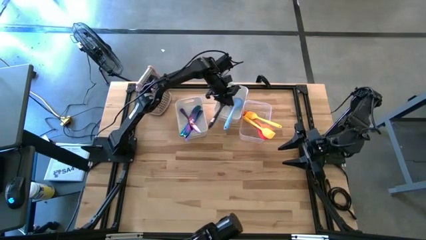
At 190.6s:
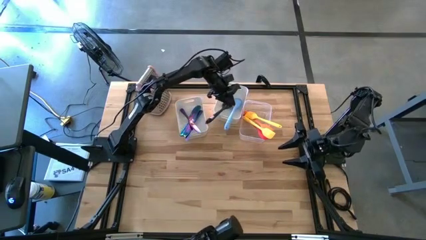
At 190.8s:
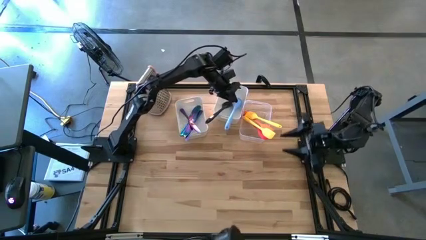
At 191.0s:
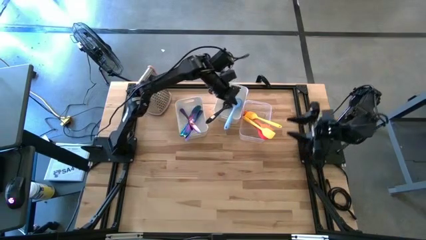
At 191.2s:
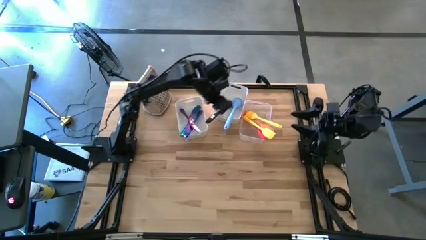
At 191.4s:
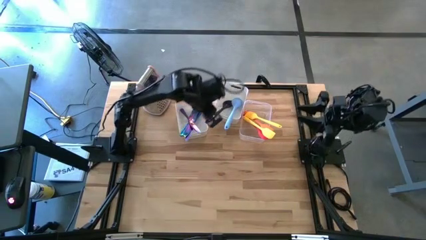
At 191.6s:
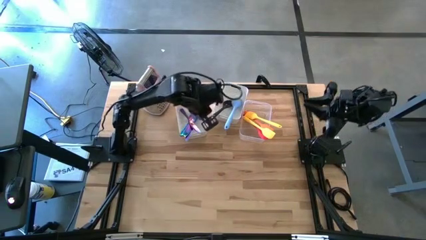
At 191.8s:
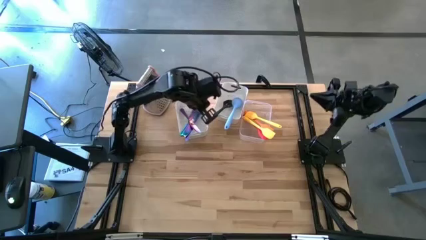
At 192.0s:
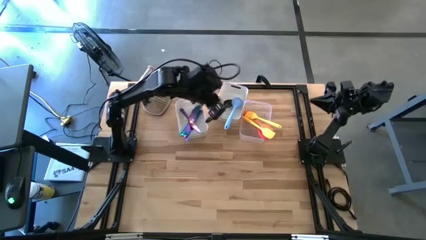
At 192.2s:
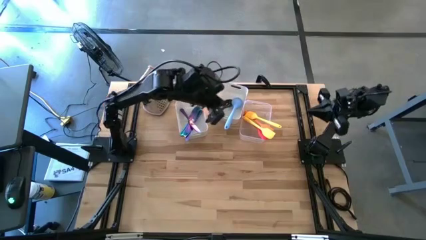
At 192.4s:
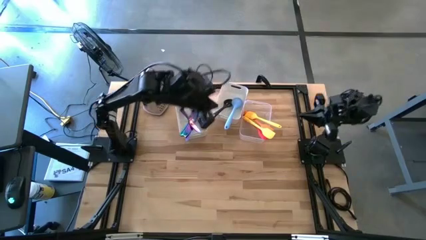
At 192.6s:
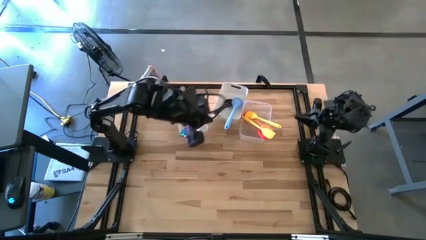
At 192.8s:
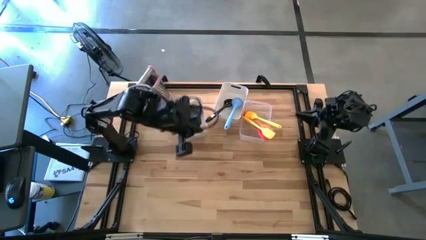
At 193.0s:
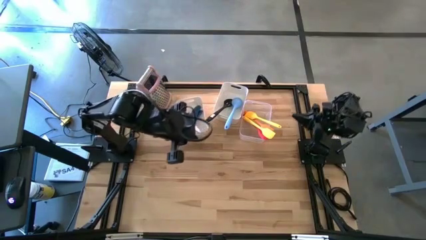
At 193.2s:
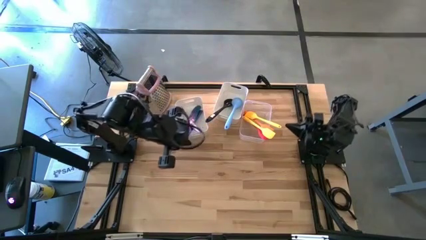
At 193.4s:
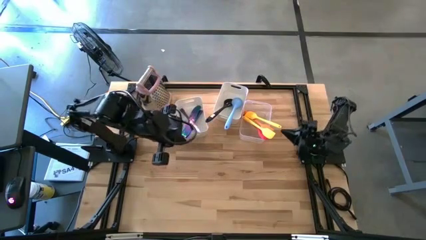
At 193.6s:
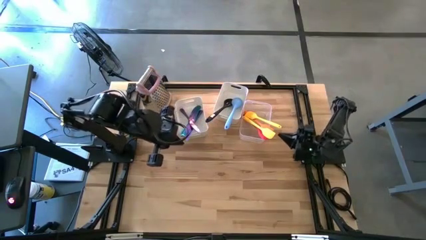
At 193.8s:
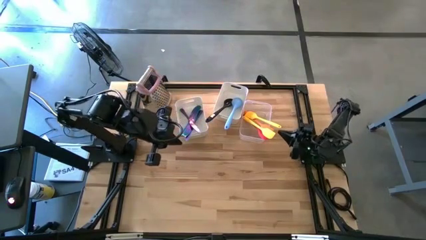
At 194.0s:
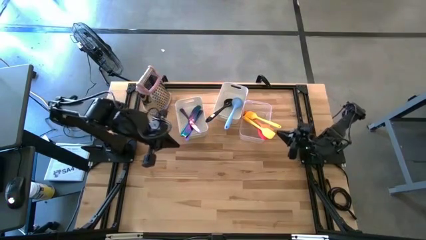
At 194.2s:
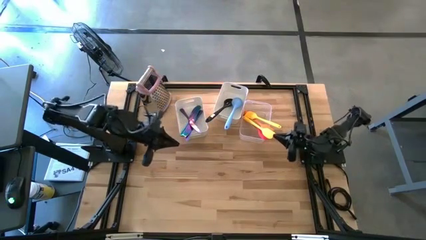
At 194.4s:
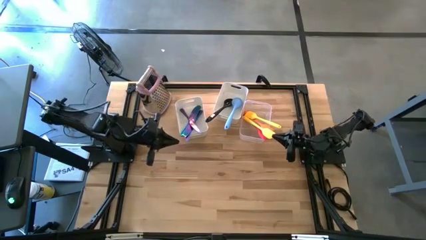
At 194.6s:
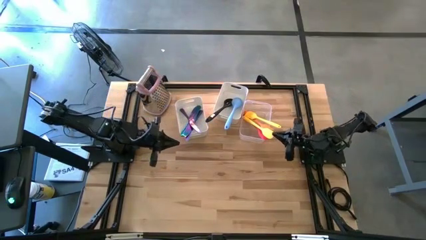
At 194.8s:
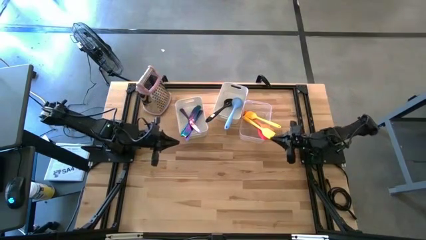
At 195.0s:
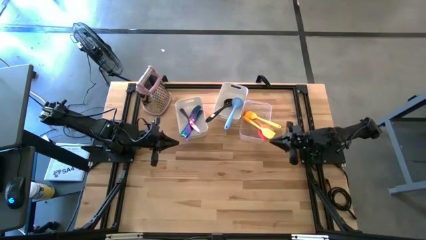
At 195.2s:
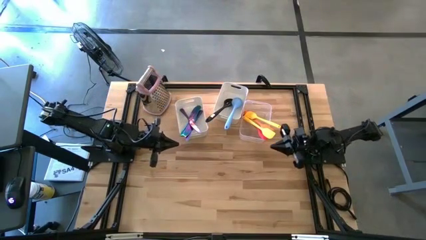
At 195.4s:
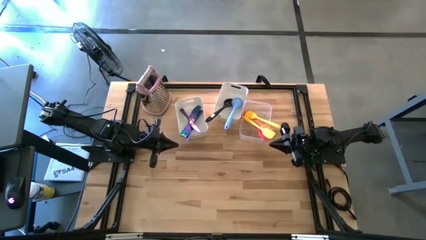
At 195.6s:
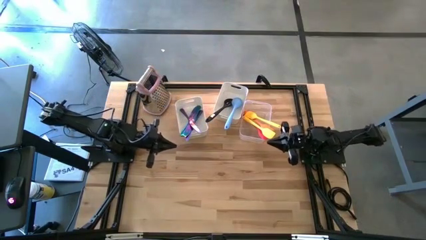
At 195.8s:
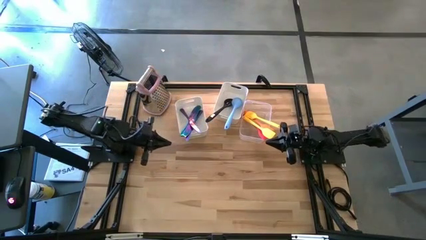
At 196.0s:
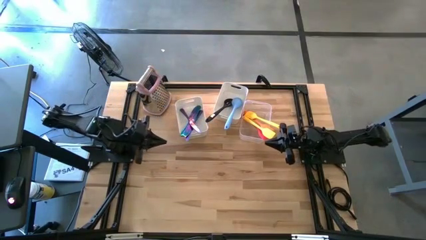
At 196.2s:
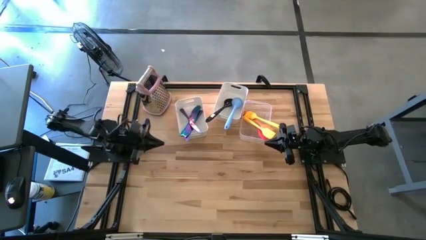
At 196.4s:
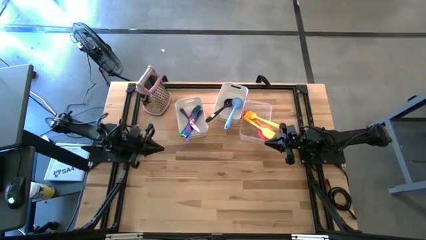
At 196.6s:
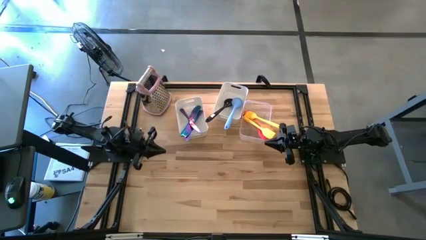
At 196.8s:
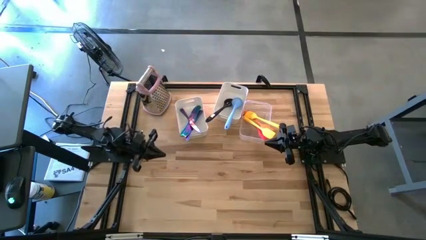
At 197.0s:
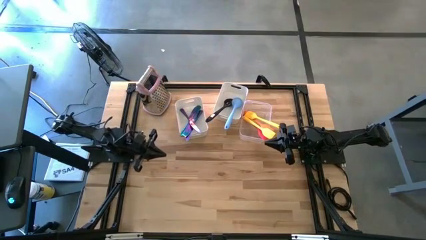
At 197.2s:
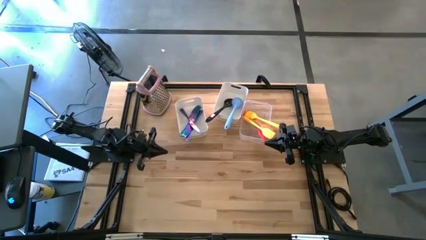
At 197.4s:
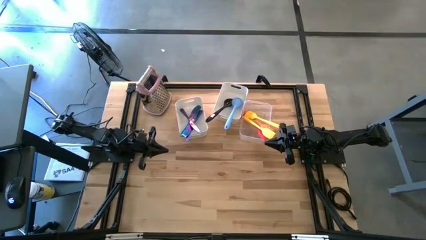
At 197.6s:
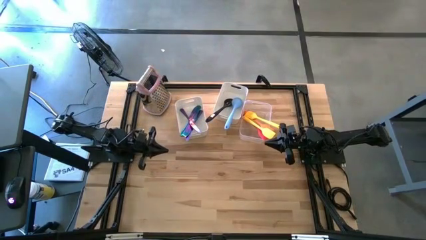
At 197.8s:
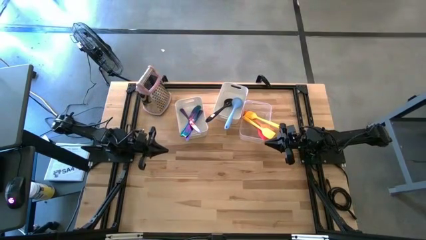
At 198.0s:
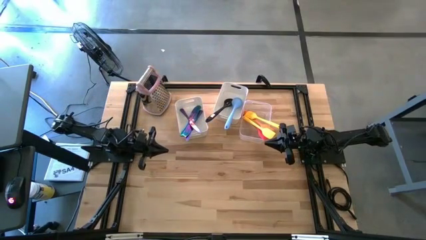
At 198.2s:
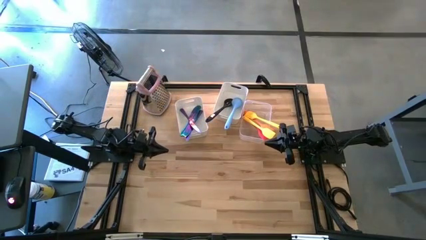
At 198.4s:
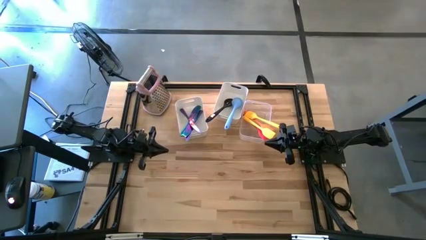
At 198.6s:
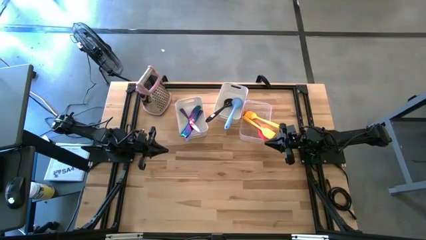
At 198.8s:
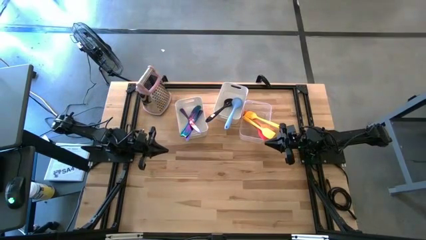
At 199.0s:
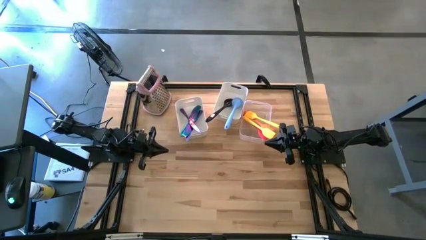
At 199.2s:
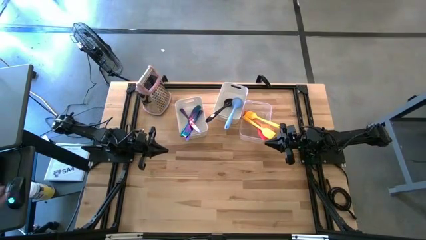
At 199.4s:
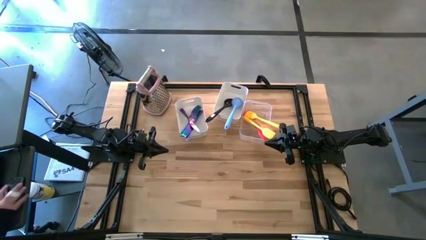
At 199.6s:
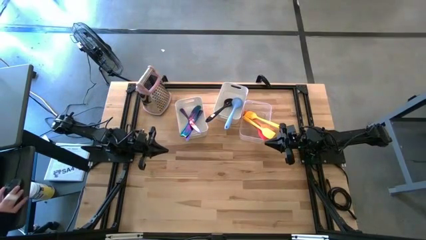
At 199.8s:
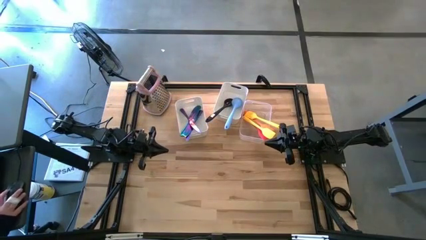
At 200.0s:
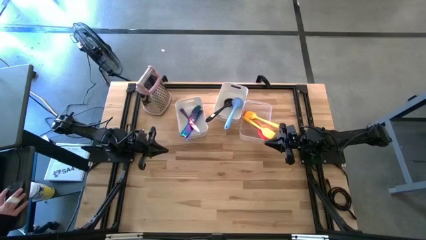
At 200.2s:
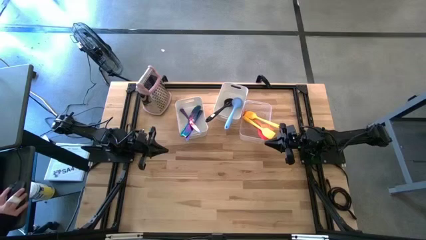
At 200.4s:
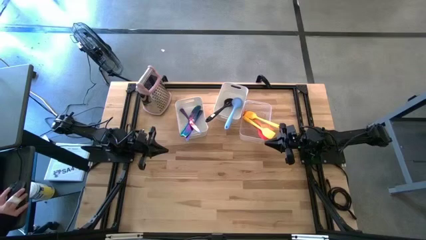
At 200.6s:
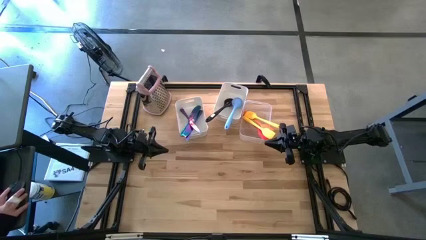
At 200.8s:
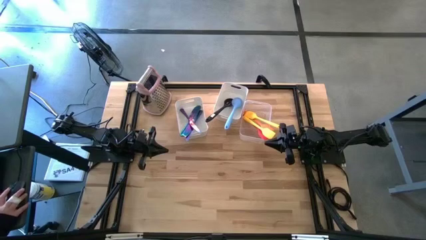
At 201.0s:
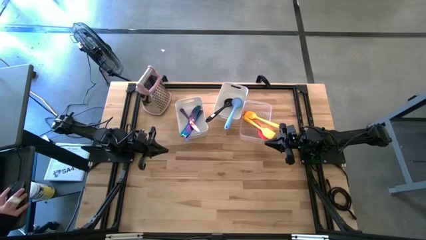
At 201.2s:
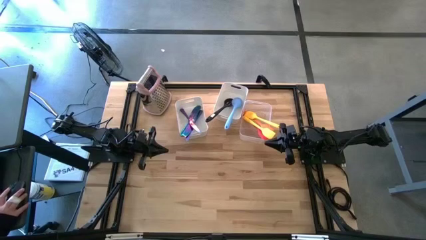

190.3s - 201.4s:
Task: Pick & Place Kitchen Items
Return to Home Position

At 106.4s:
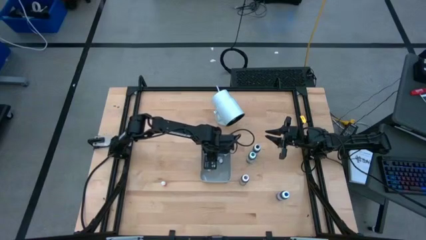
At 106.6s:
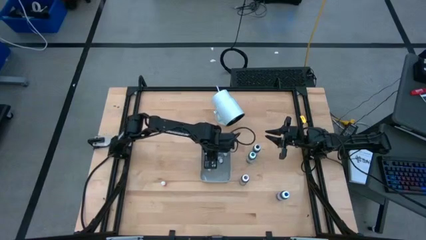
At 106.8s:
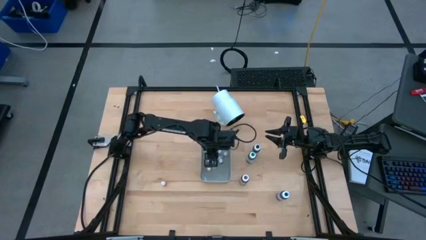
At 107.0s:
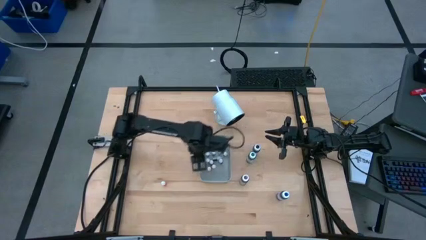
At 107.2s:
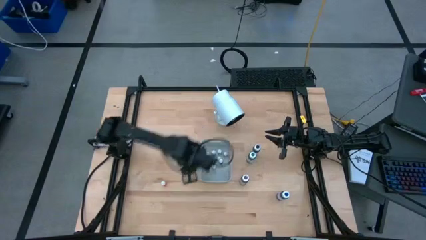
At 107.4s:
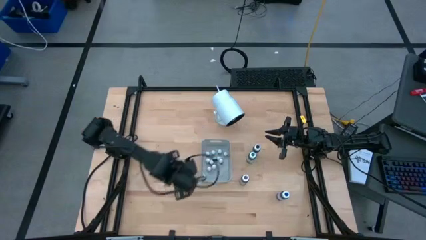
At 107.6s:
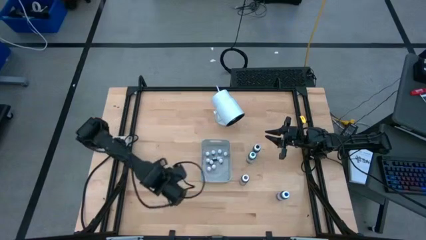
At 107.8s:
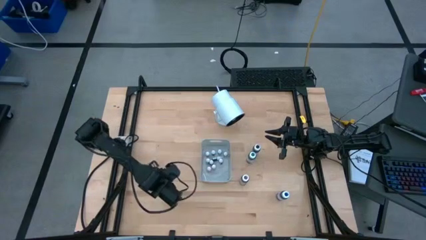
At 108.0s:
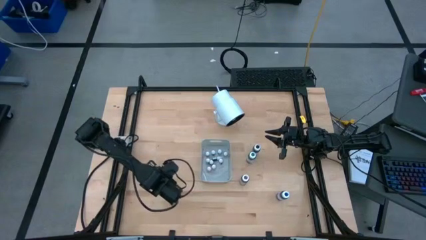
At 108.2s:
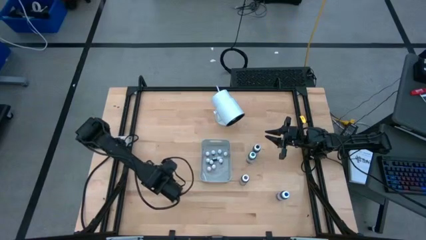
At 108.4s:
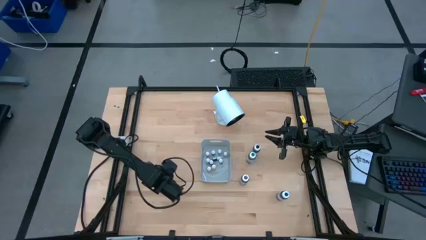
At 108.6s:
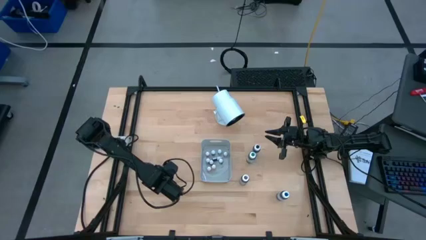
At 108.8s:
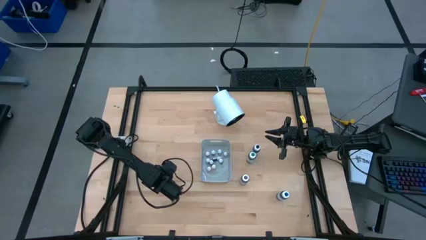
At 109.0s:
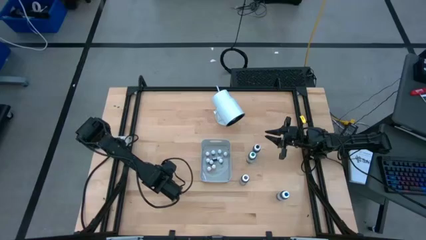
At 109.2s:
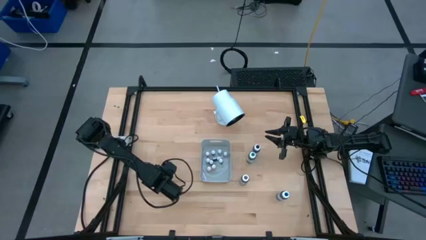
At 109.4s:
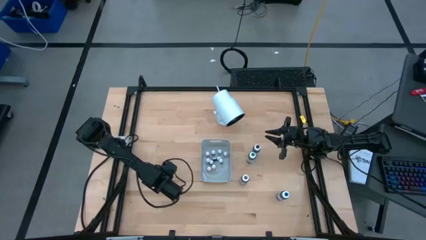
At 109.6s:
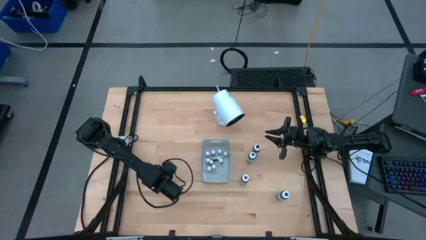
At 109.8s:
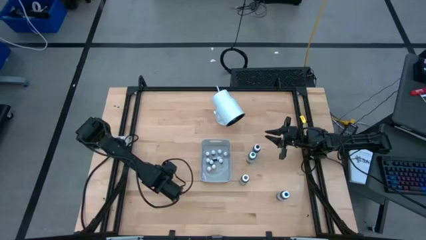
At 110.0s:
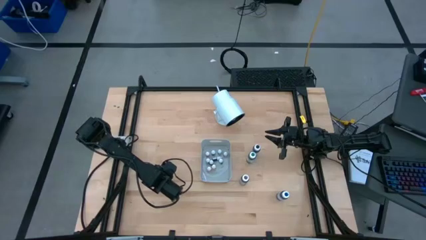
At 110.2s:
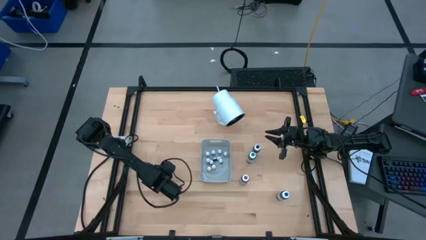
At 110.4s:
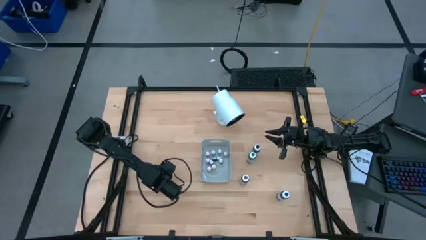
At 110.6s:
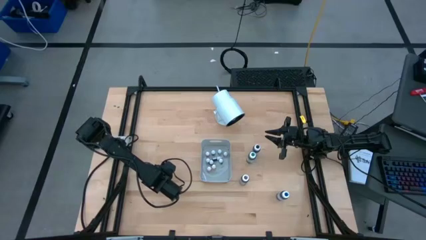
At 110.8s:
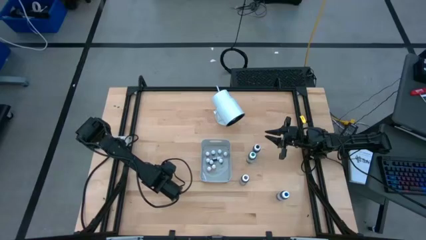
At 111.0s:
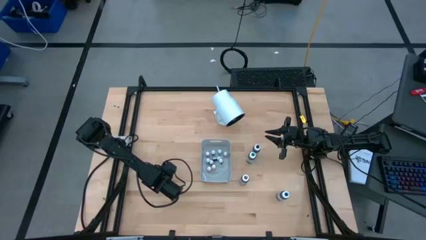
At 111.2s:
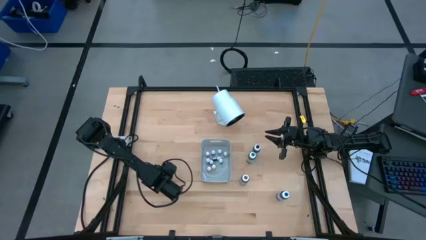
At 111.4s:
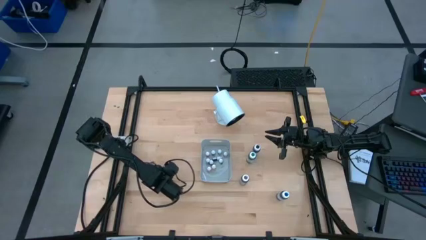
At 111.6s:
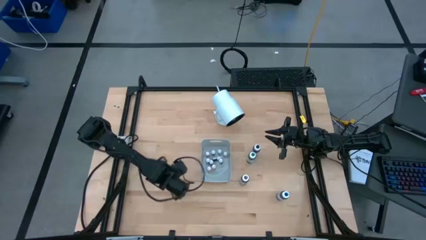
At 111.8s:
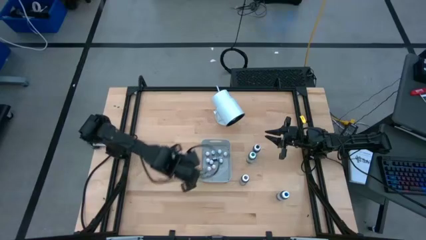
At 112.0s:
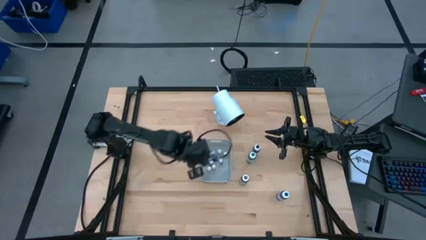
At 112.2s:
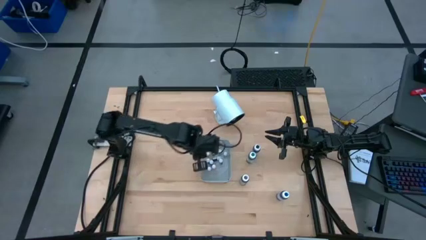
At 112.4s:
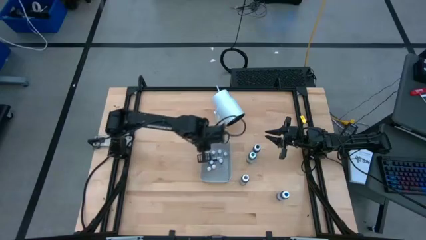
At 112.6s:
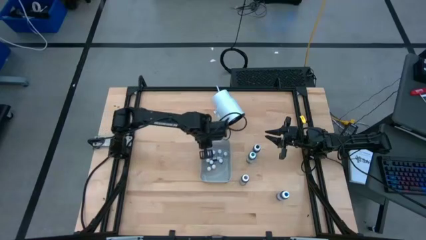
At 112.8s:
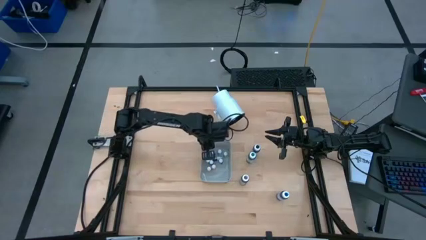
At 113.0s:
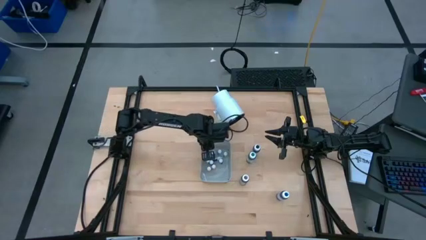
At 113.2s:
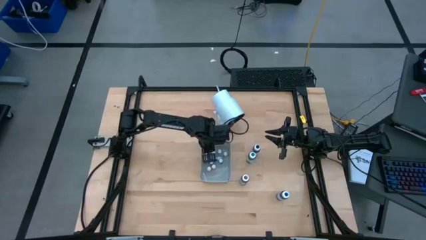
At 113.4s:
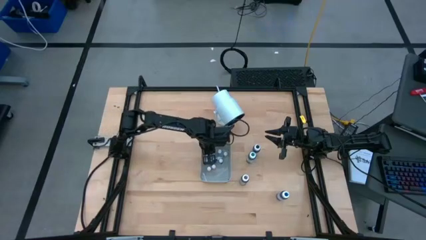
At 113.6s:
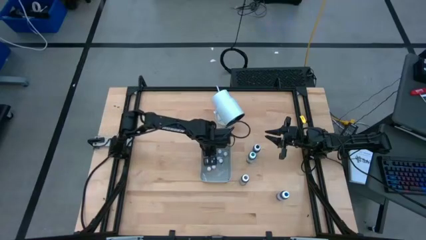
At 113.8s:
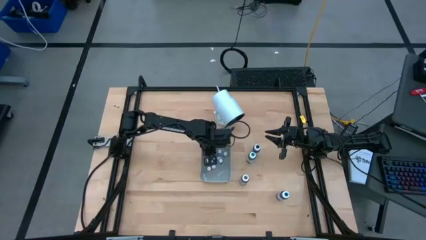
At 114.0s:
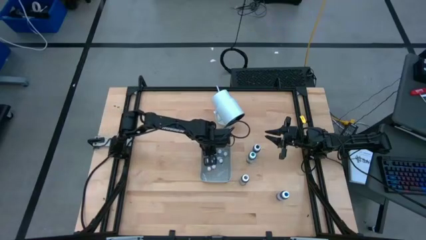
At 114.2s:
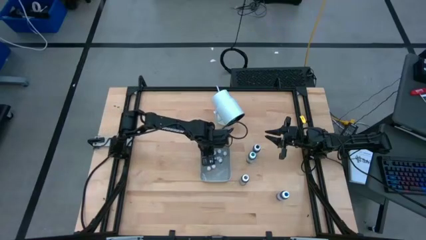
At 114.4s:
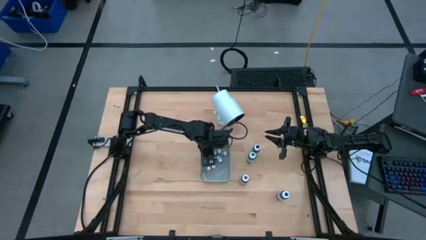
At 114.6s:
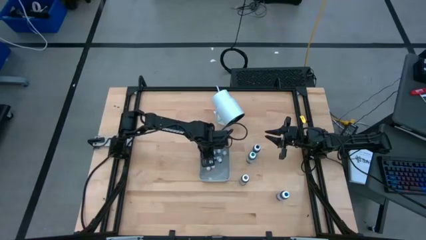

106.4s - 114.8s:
Task: Pick & Place food coloring
Put the small orange food coloring bottle into the gray bin
